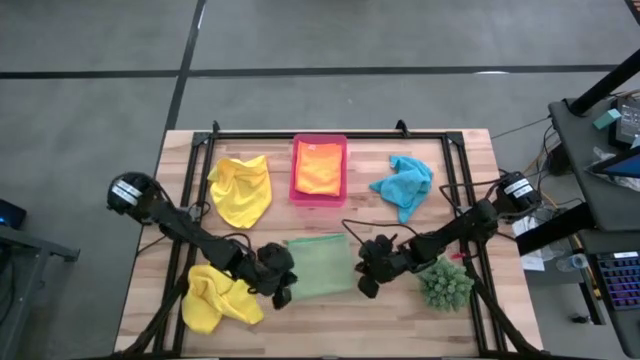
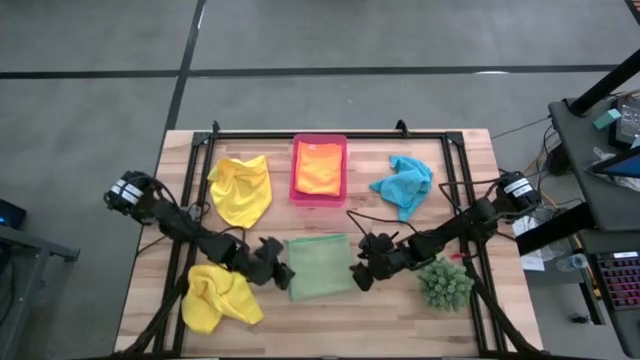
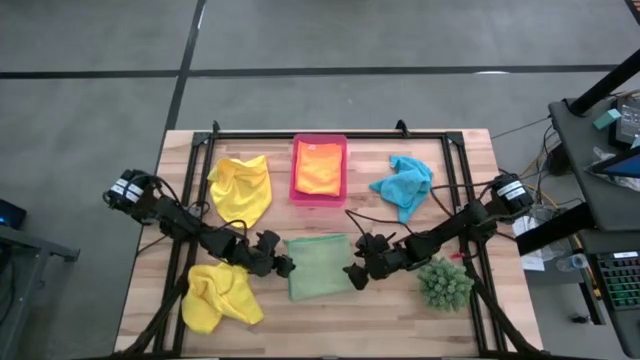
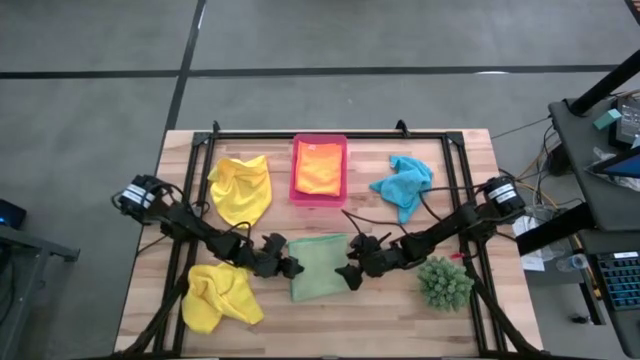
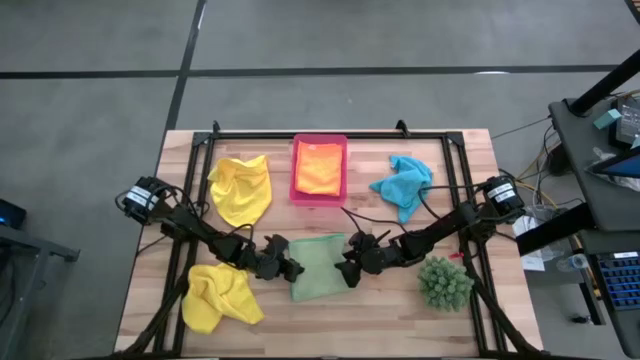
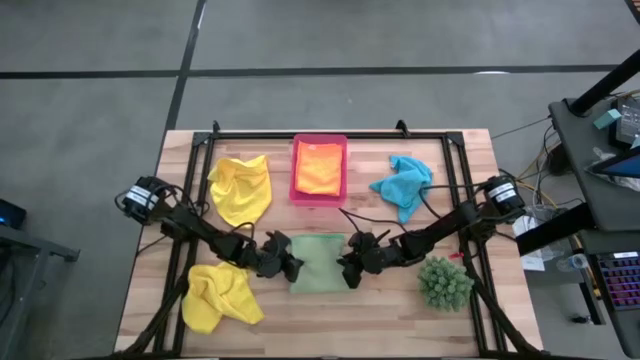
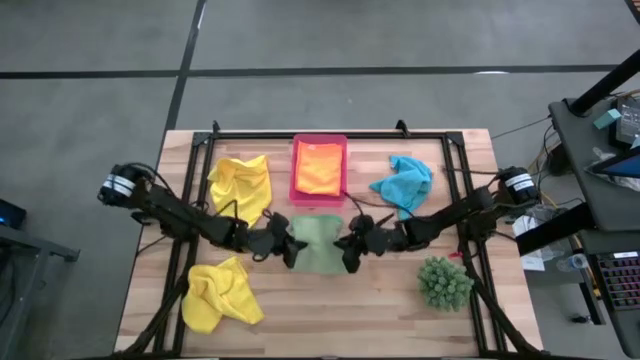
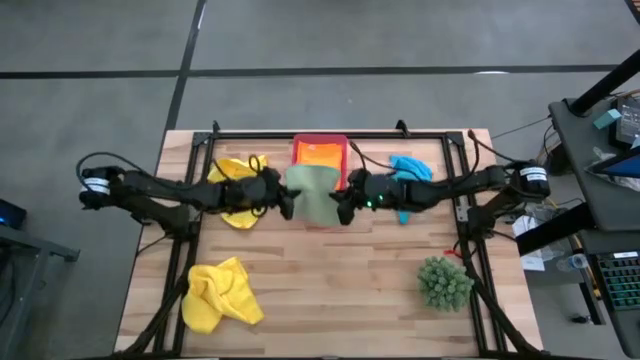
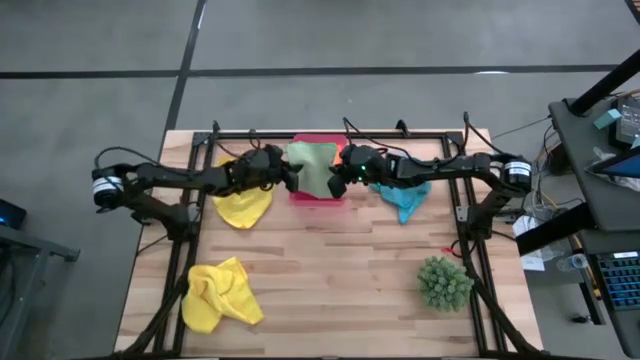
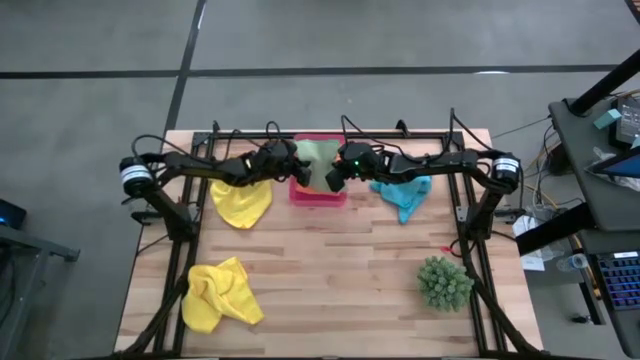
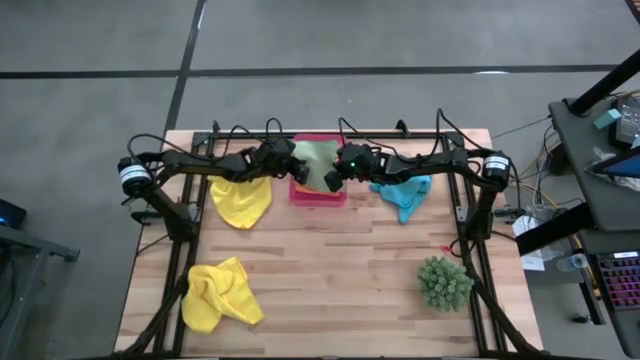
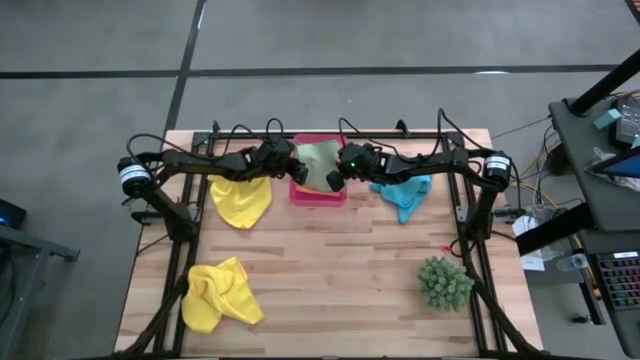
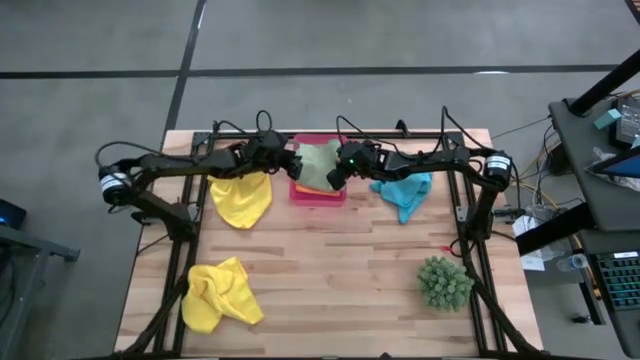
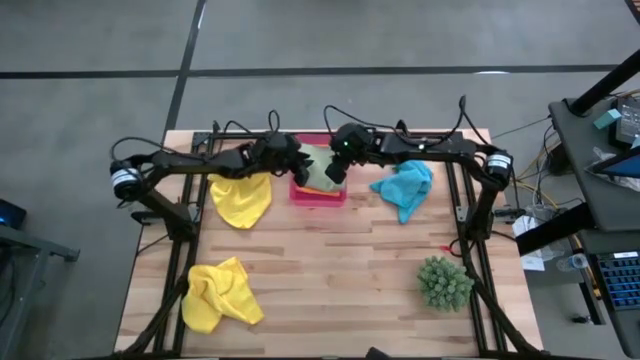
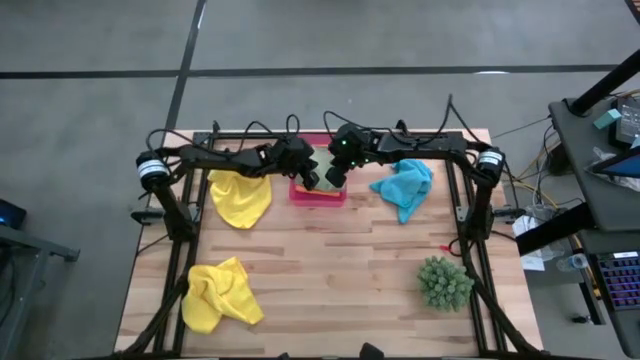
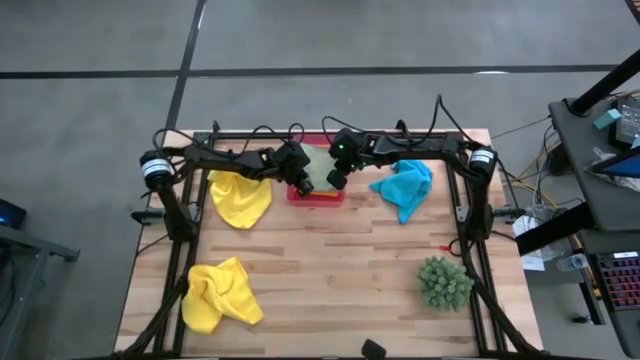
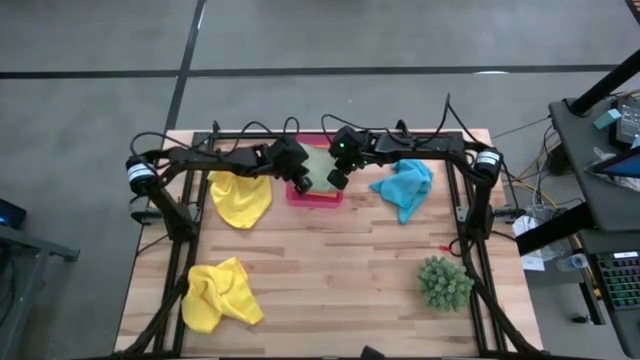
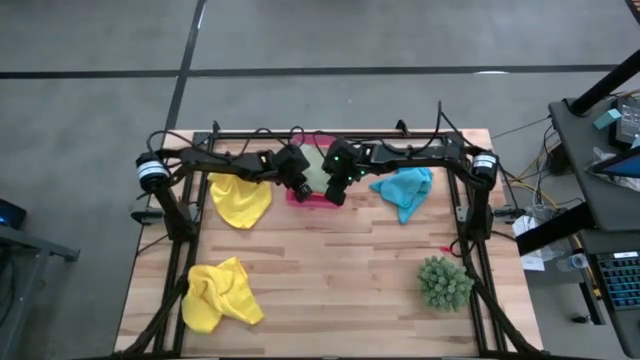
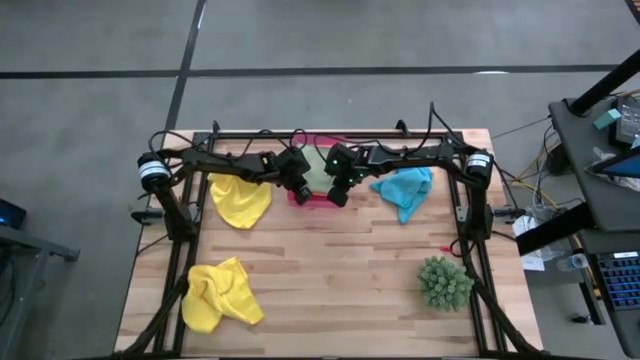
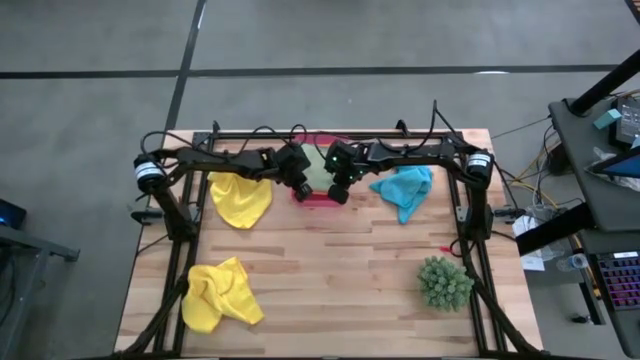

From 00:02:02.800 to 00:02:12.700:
Task: Fold microfiber towels
Put the green towel into the bin
